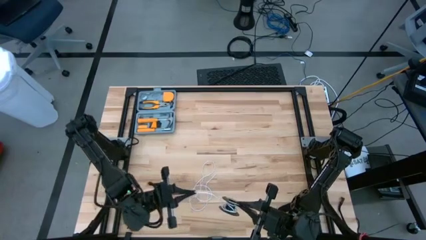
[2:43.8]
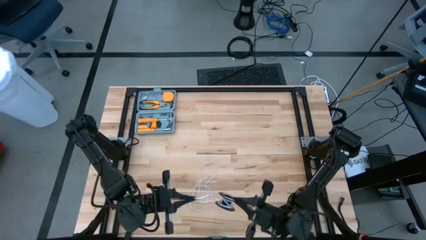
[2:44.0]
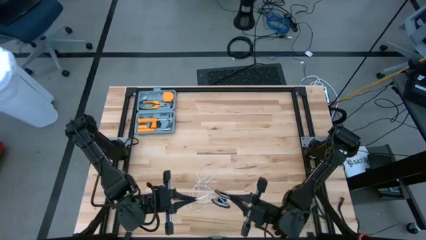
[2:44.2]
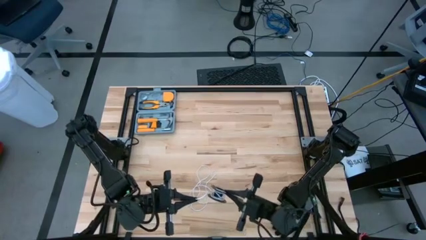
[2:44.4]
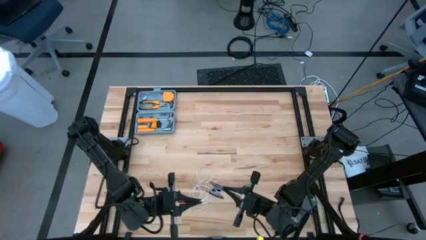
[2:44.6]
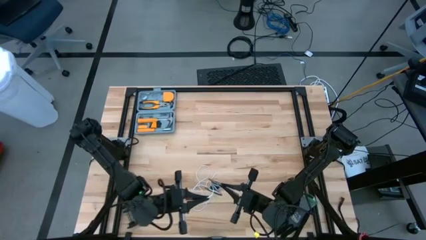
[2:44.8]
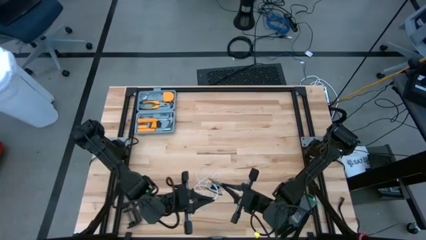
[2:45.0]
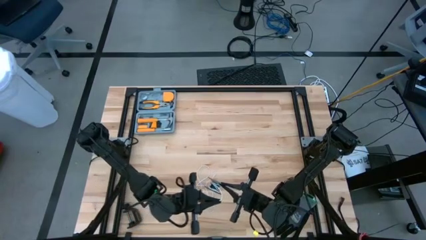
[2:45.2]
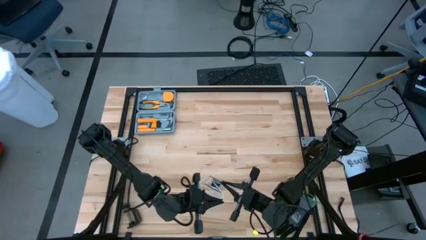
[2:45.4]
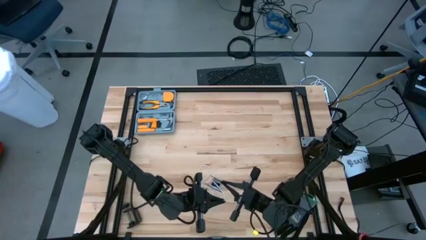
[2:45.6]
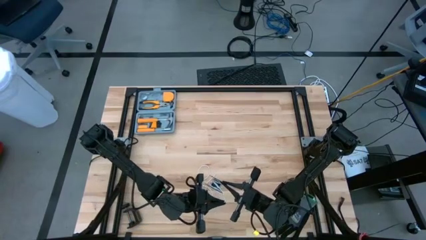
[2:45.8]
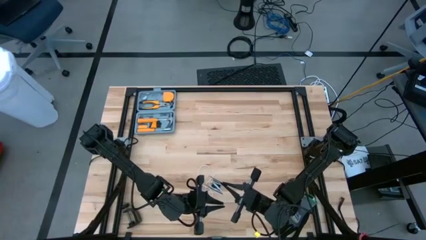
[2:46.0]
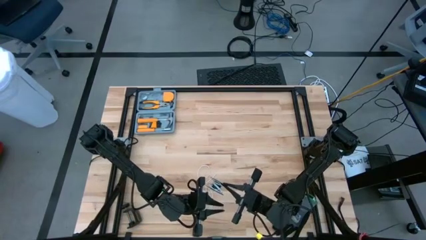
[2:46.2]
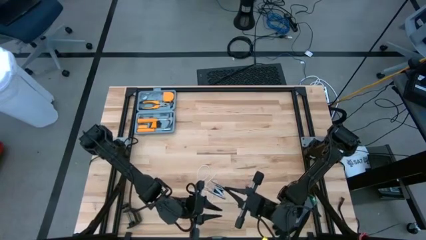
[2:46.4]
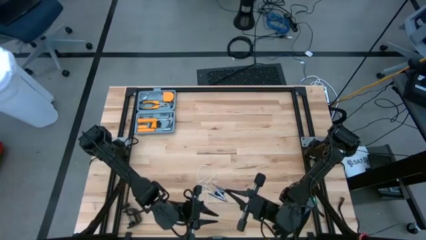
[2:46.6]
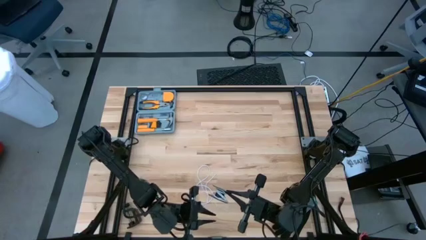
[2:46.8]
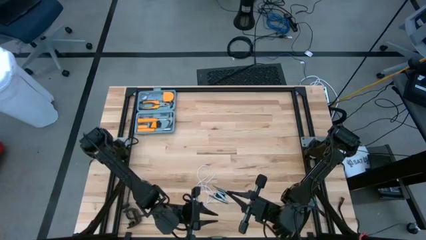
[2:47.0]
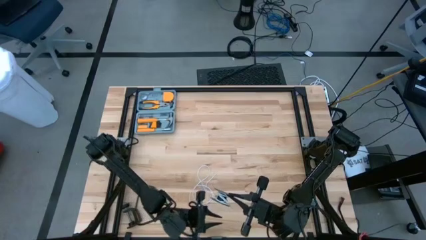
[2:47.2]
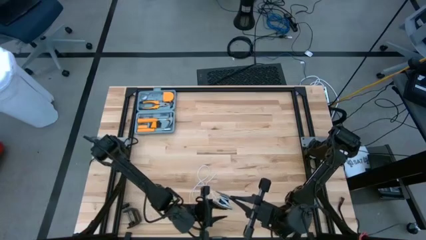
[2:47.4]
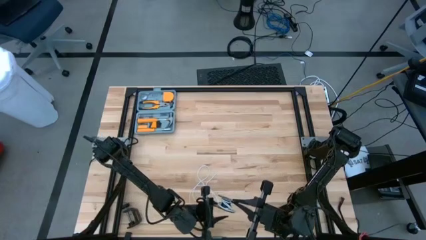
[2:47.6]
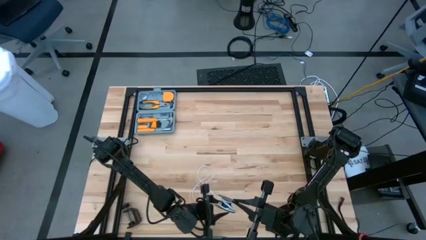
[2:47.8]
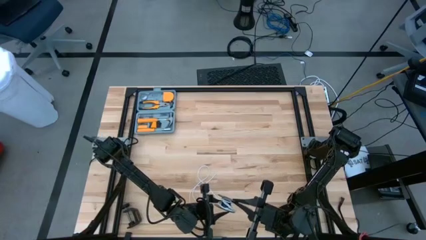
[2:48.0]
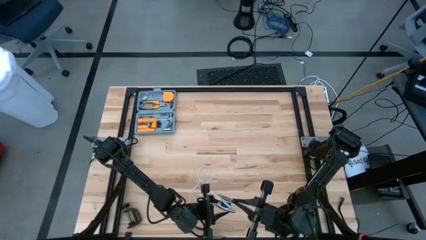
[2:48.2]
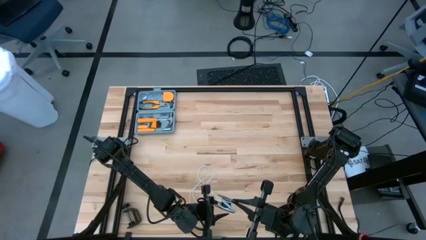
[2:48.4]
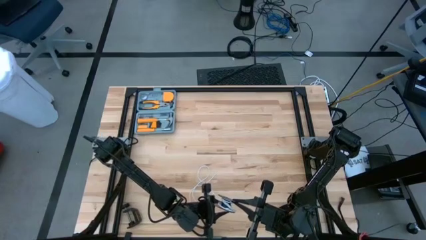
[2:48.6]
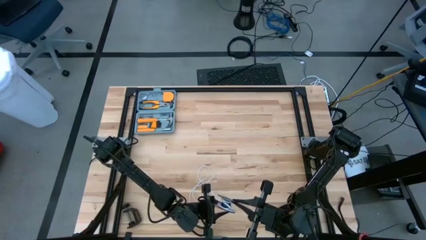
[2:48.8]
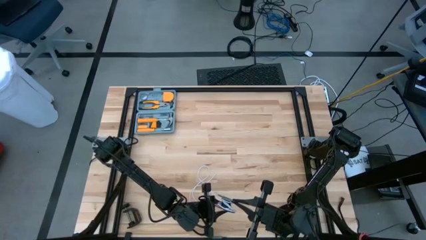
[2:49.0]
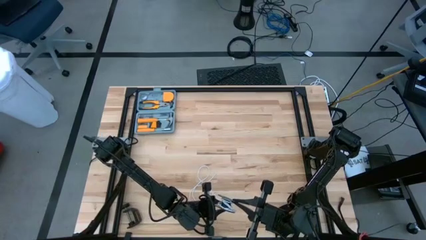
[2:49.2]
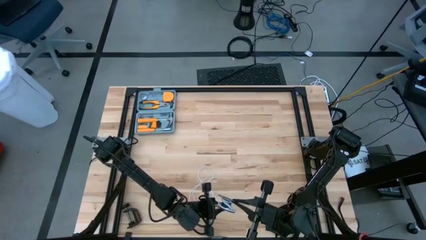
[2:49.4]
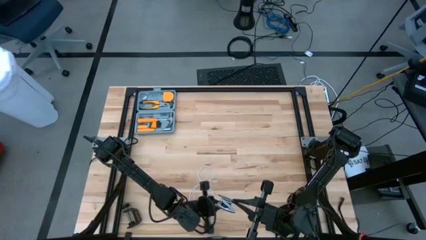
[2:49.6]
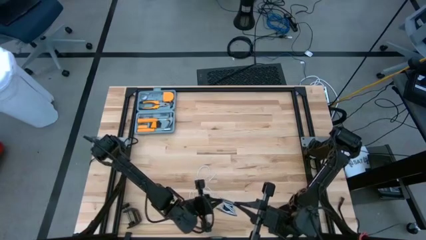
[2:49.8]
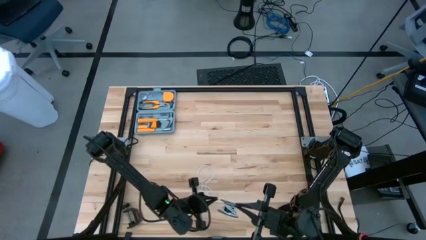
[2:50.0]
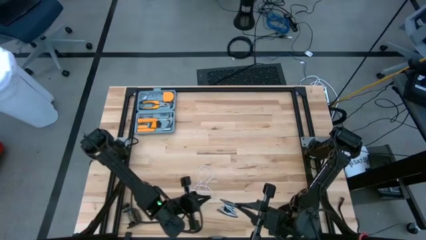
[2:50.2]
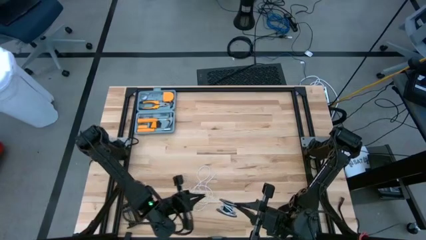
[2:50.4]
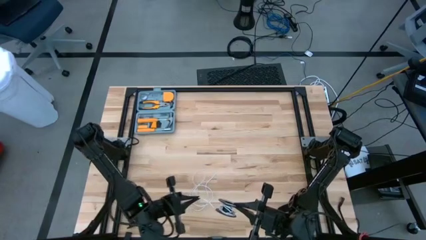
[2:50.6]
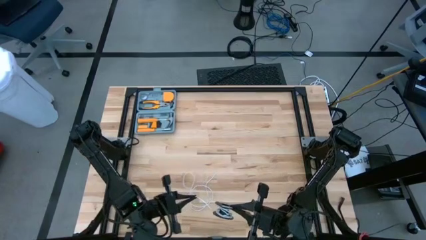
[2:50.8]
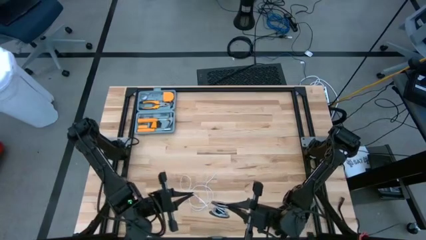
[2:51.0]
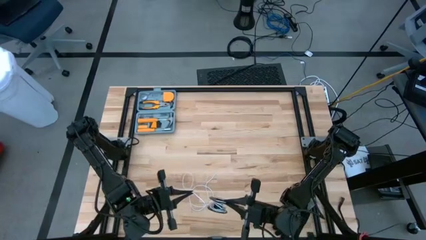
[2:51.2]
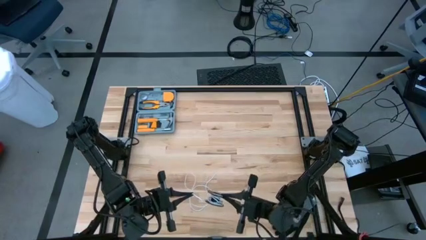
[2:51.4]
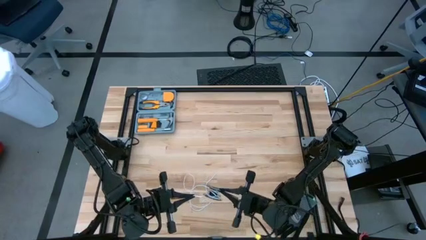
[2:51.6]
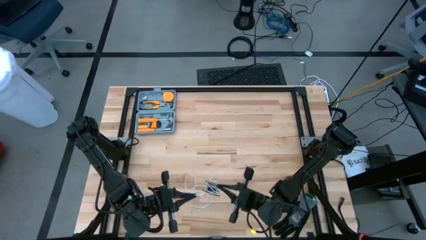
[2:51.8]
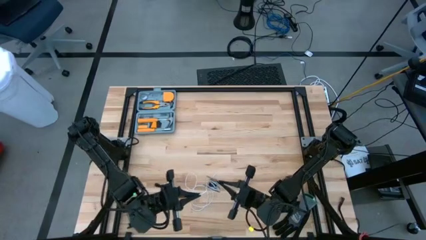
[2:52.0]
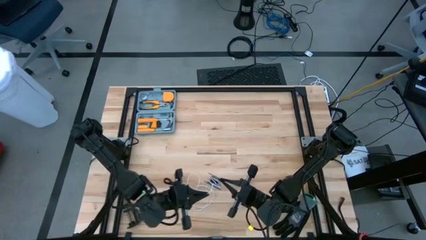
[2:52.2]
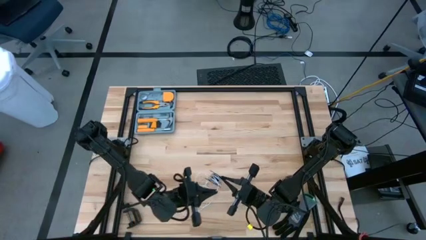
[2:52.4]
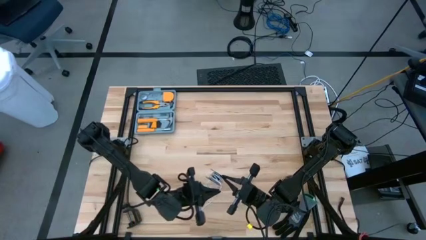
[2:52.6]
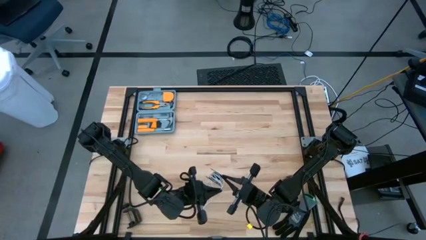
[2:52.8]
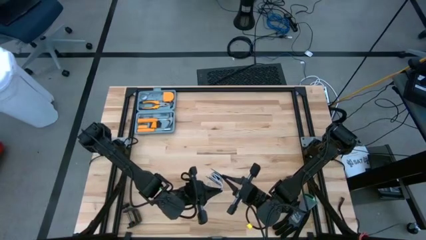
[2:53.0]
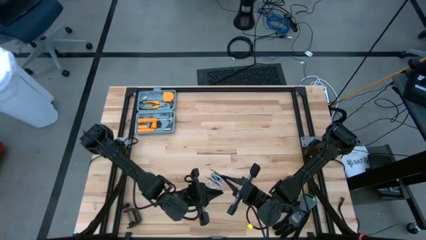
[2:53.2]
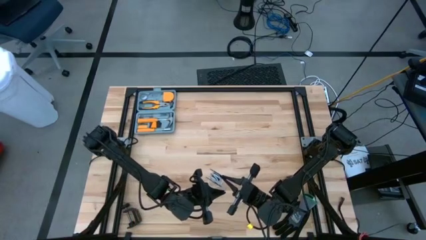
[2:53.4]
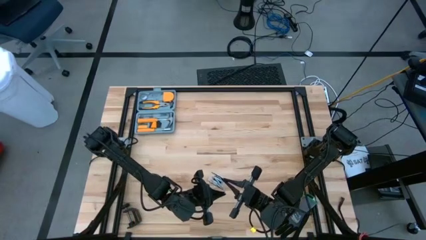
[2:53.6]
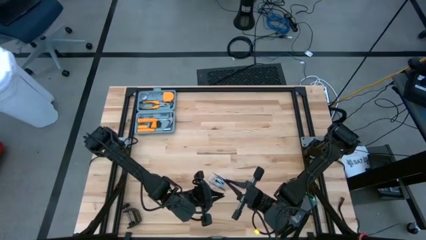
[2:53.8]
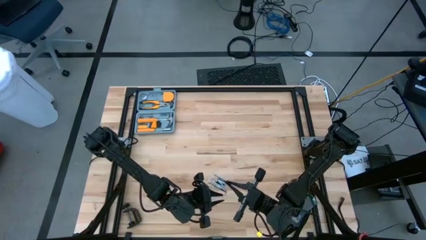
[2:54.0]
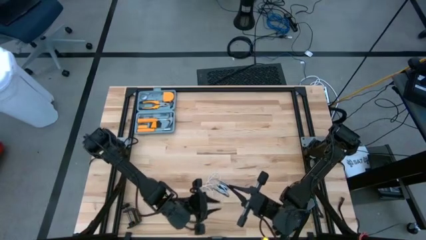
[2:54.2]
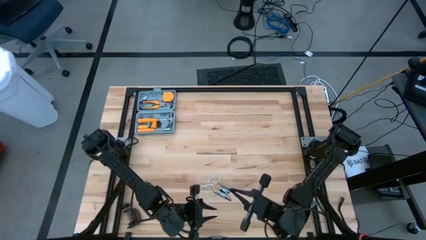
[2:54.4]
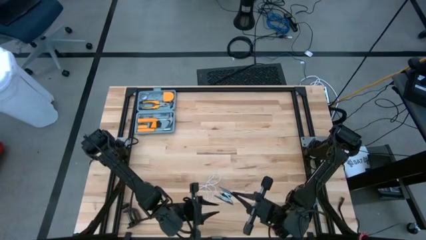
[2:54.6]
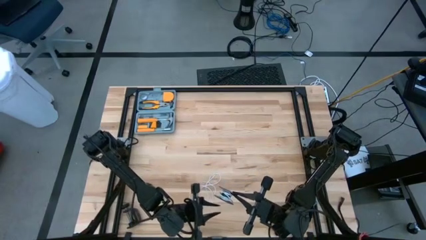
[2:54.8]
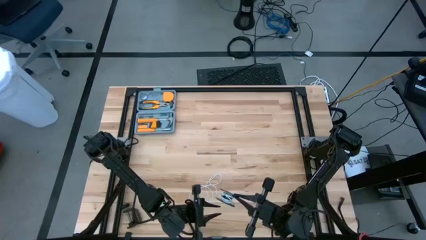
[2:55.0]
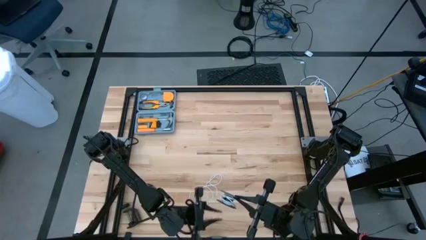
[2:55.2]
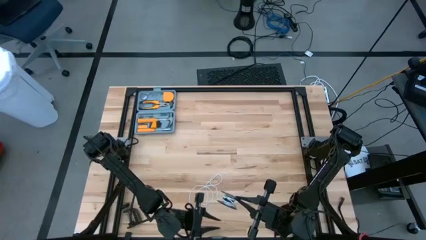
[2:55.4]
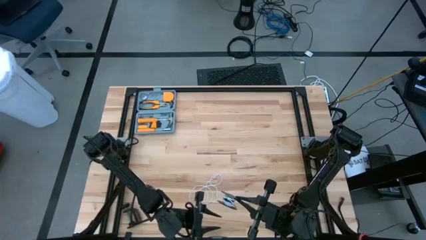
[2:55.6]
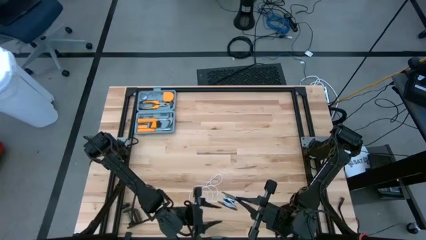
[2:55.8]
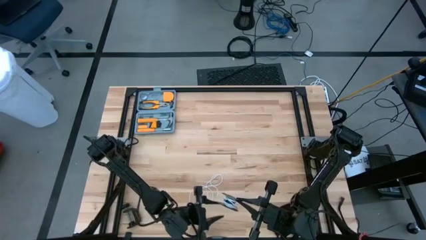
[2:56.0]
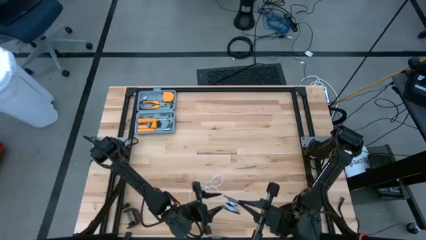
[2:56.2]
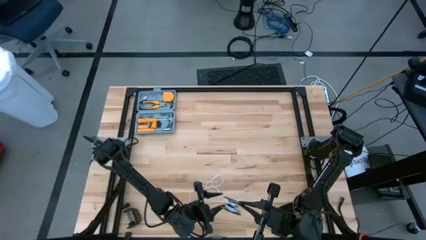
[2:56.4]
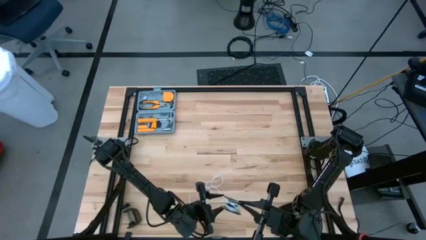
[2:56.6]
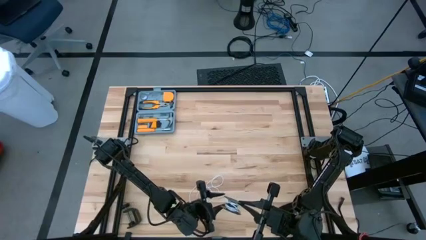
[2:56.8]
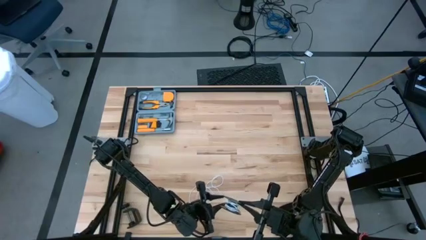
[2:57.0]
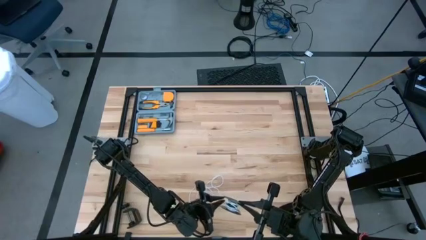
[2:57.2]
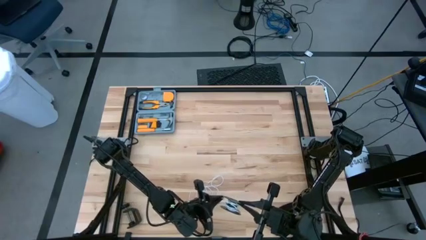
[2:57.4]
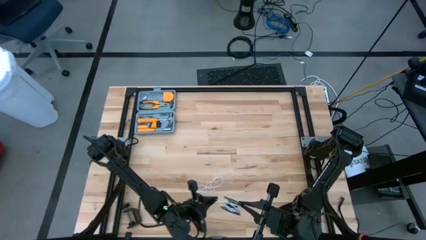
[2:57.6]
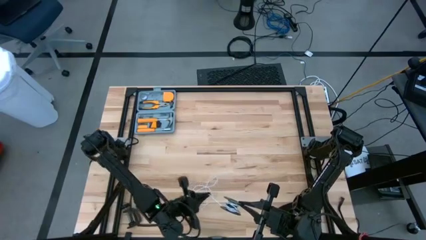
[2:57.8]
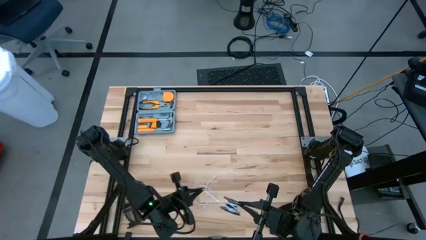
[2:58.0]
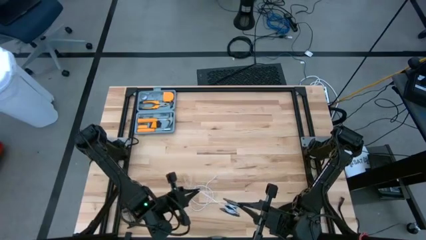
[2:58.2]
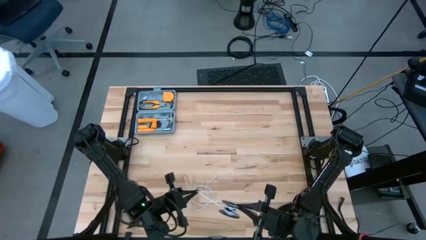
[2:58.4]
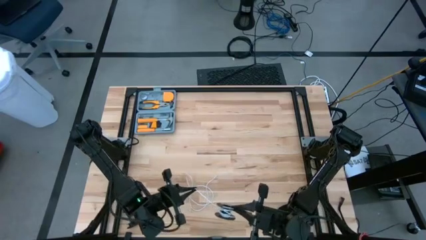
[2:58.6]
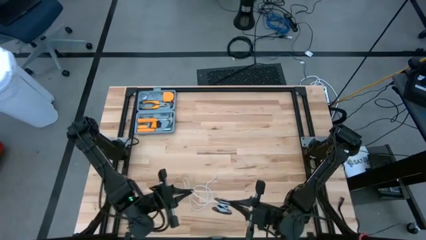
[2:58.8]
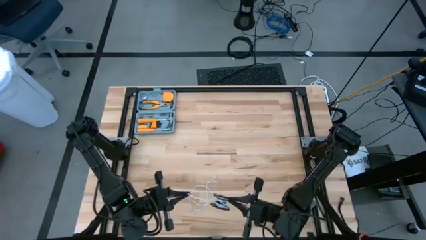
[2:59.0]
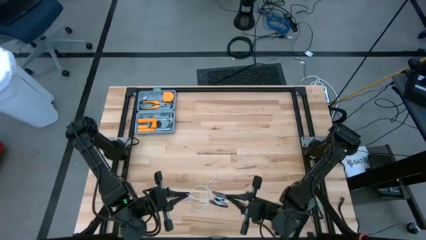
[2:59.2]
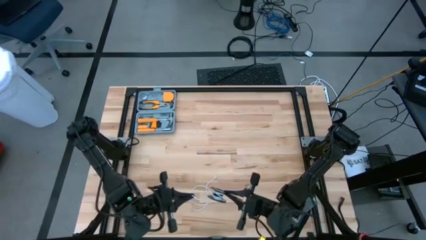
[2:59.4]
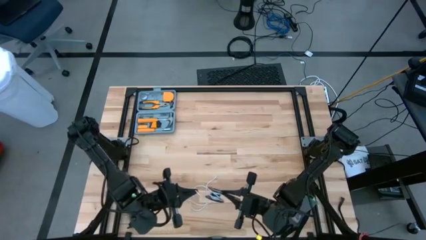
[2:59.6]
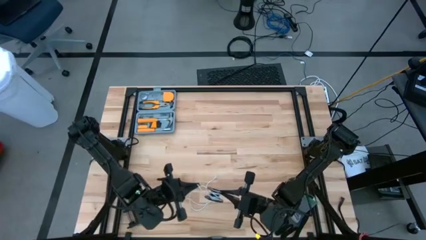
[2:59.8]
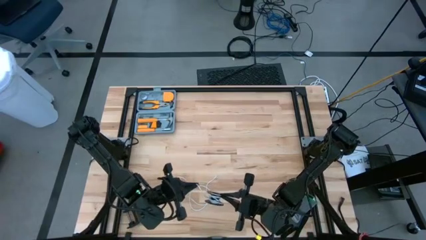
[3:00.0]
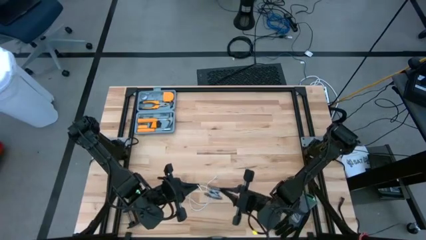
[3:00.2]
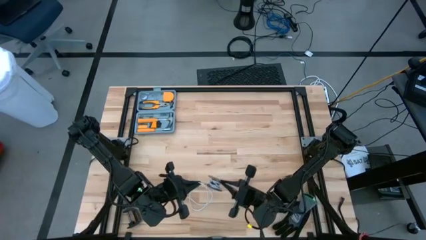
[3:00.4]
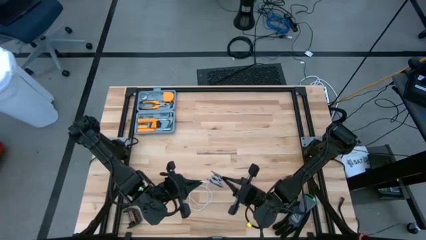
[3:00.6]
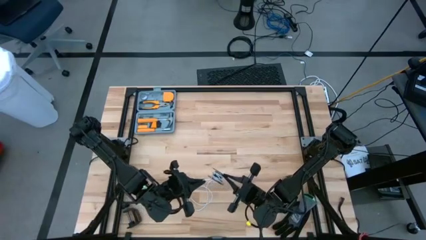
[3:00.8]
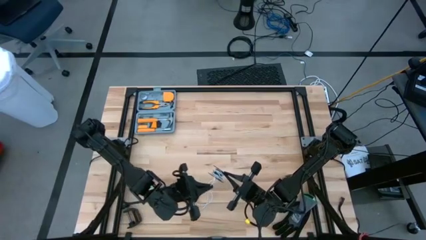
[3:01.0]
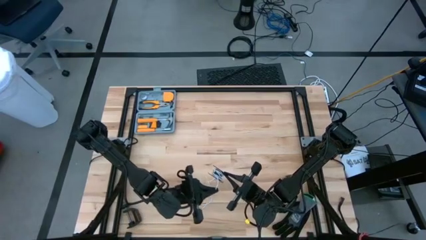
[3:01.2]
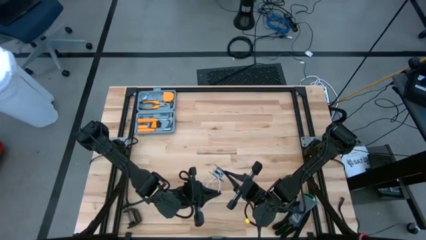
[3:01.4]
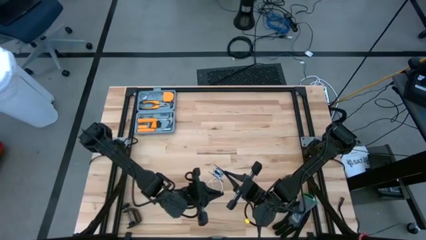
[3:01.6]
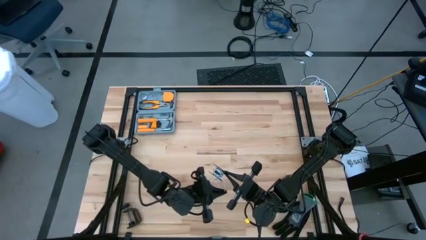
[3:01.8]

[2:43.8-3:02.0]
Task: Coil cords
Coil the white wire on the spool
